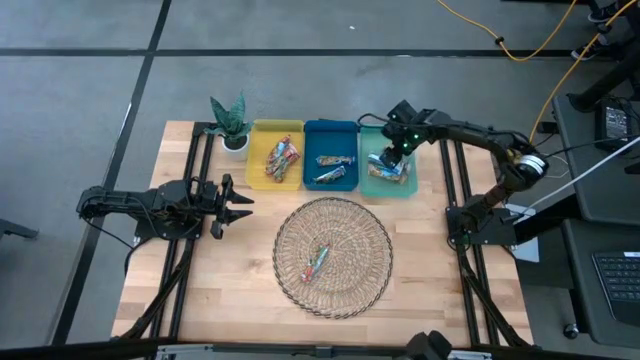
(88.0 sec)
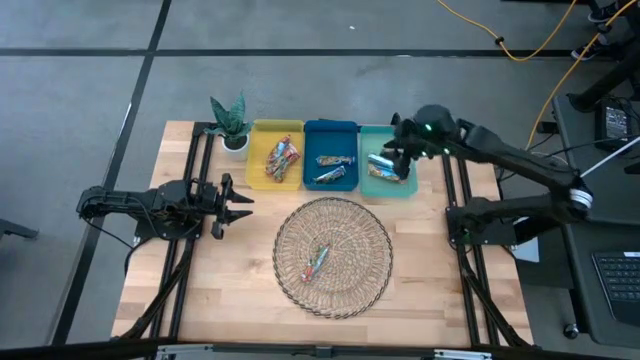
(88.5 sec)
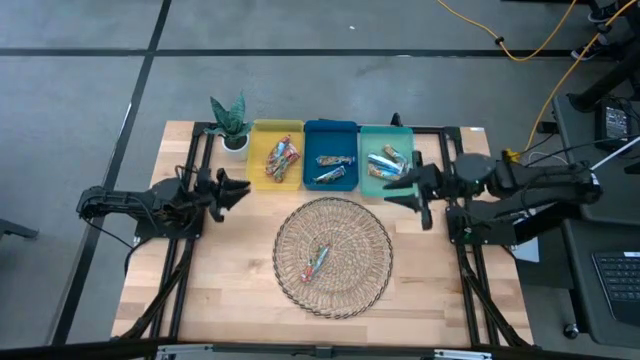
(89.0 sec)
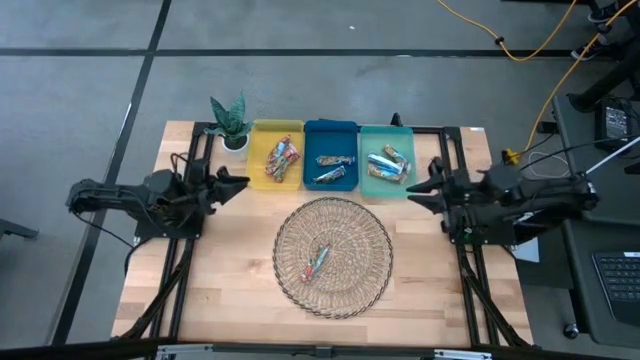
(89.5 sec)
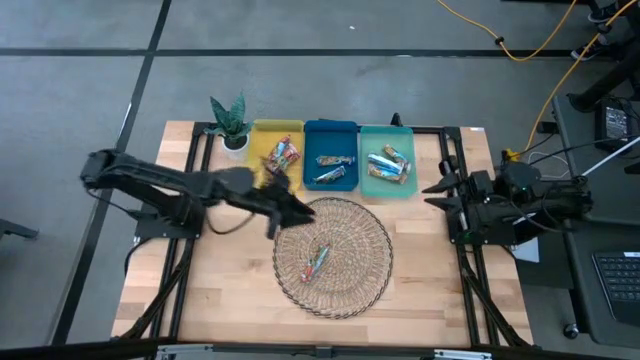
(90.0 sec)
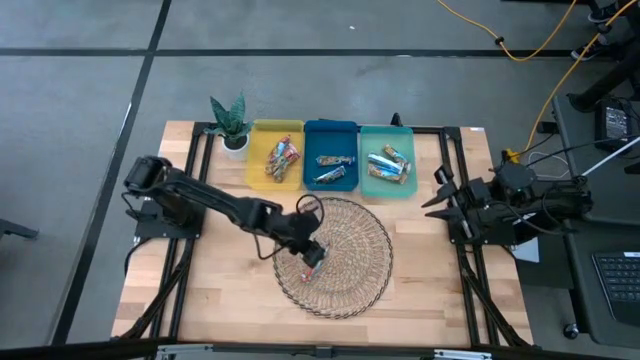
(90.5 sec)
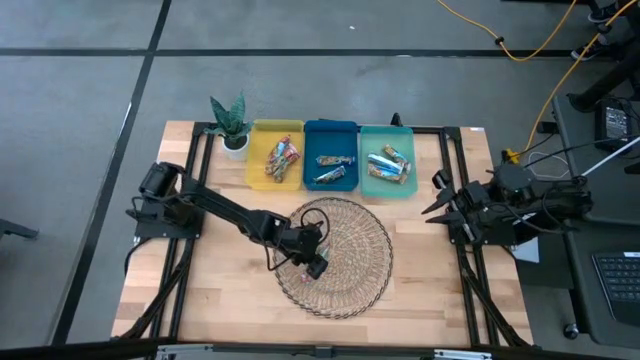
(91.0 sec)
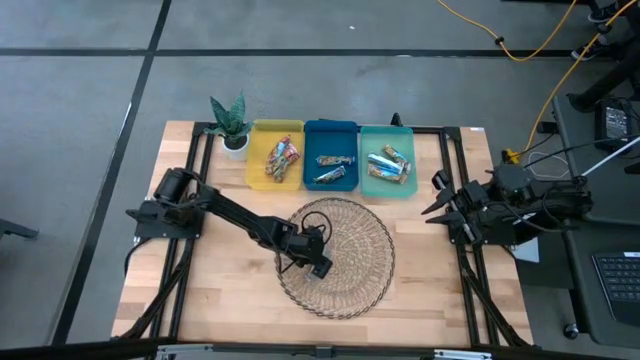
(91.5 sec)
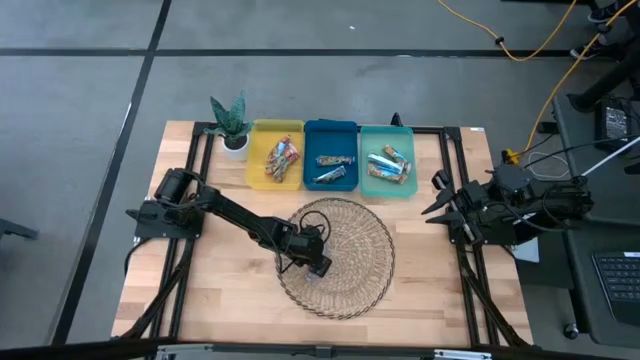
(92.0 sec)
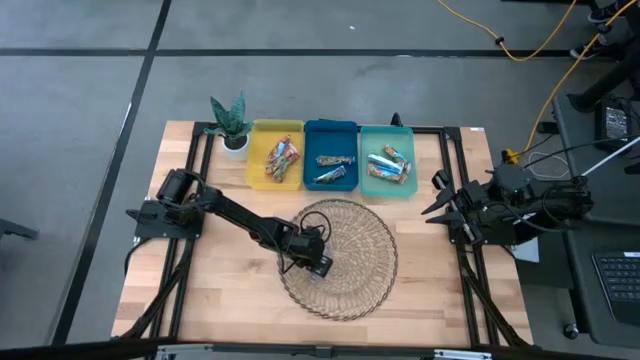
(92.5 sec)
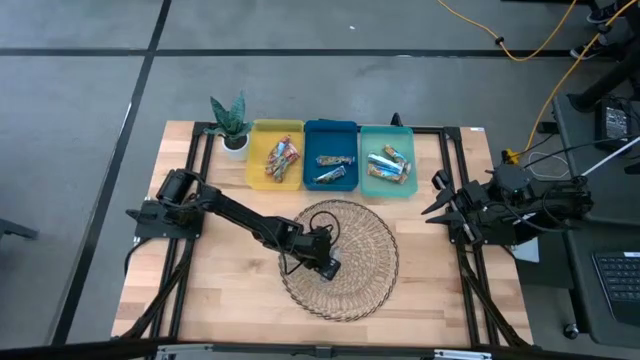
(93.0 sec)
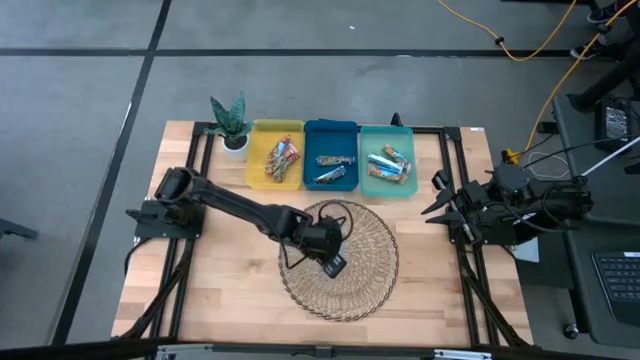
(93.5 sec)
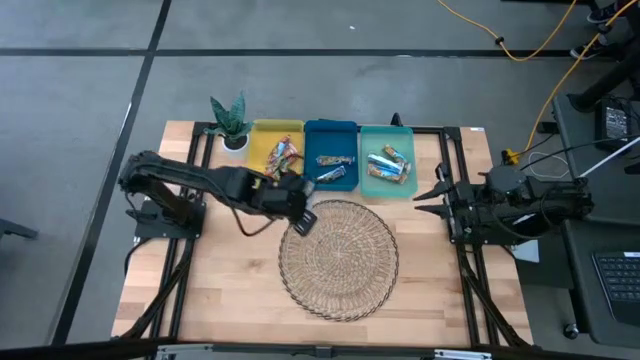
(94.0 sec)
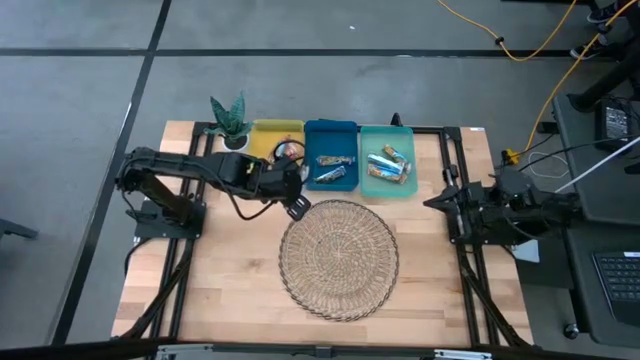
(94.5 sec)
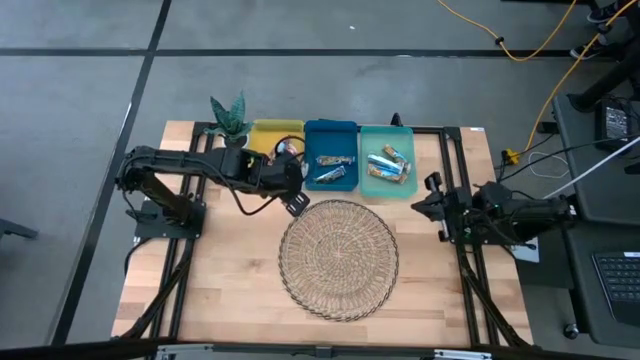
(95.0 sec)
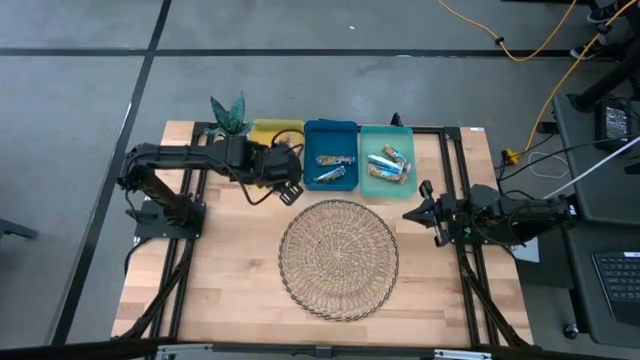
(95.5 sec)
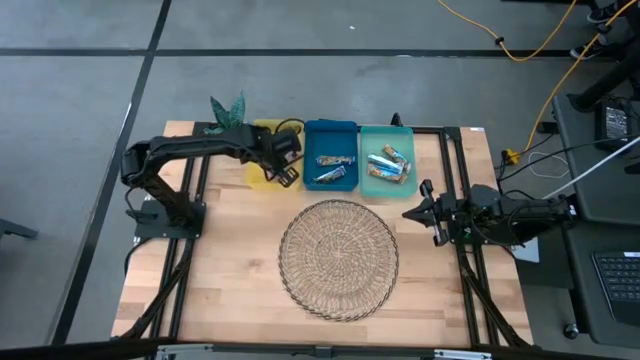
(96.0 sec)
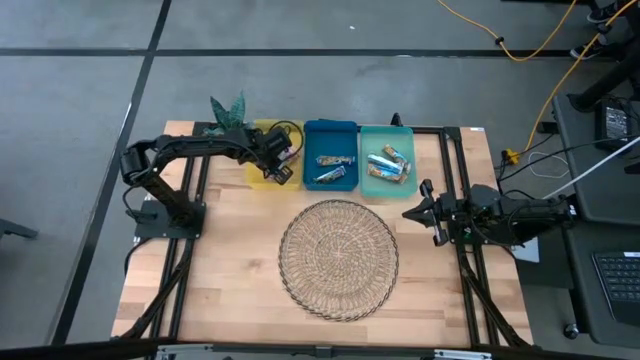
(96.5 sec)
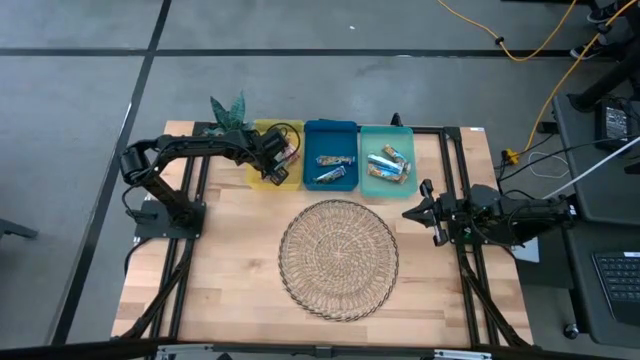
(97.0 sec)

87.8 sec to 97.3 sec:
Task: Pick and place Granola Bars by type
Put the red granola bar into the yellow bin

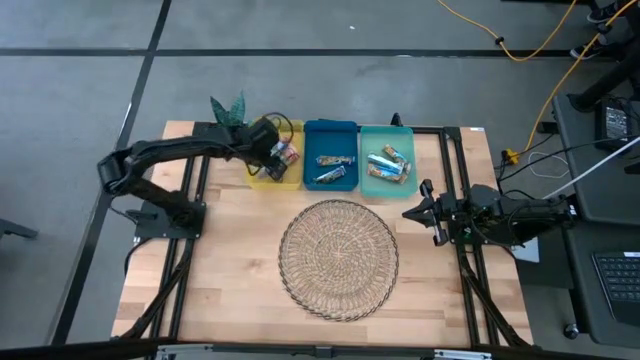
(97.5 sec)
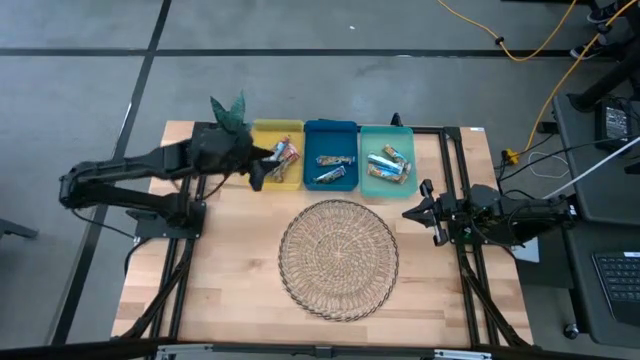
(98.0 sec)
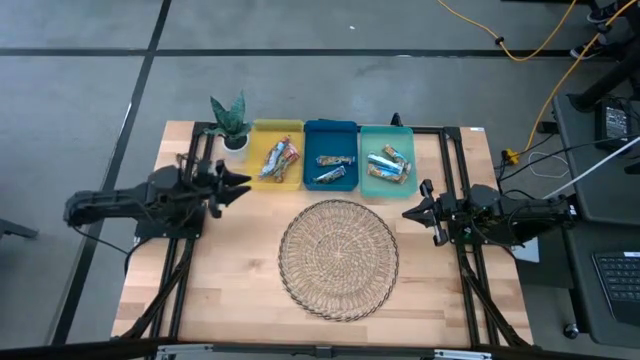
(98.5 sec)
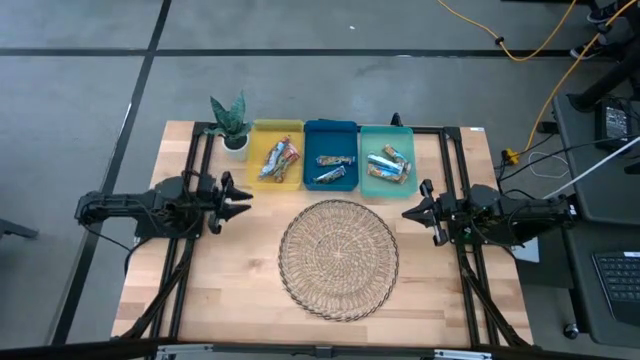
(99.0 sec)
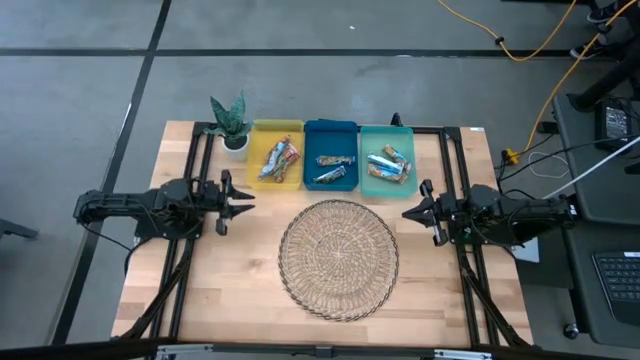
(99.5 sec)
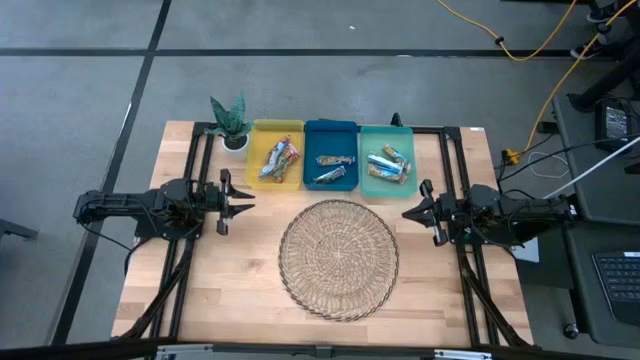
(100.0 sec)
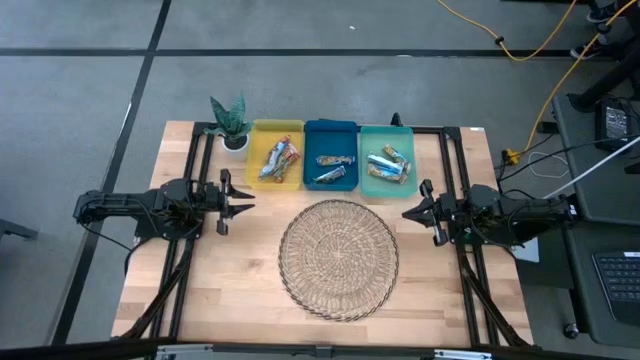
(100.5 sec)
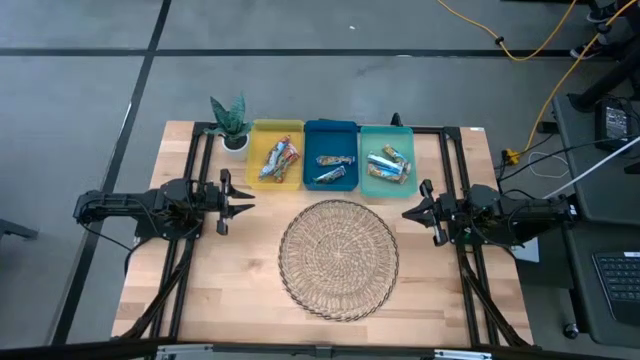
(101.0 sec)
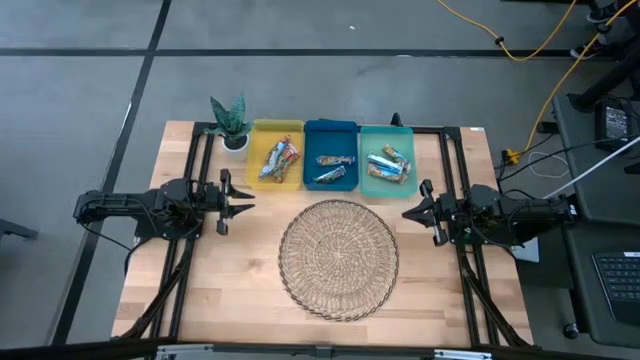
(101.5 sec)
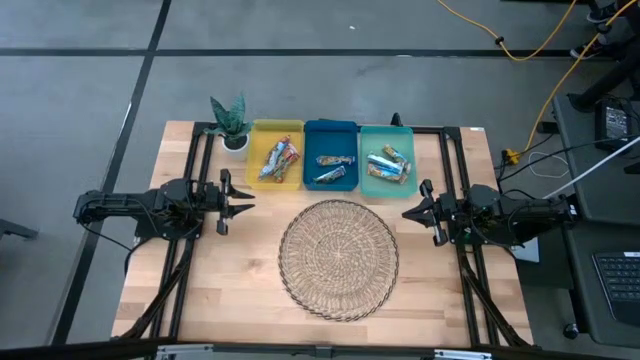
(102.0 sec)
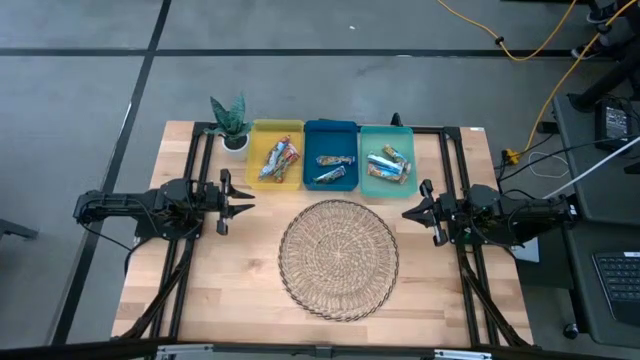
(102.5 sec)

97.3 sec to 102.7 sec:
Return to Home Position

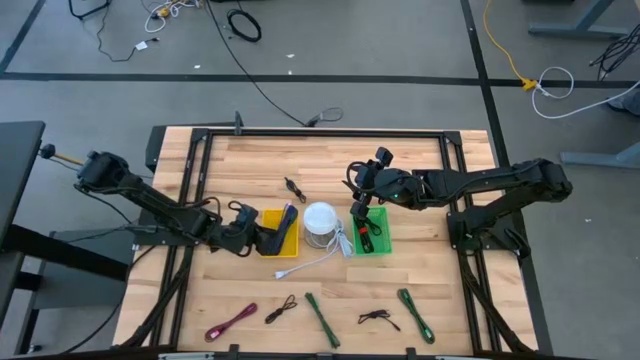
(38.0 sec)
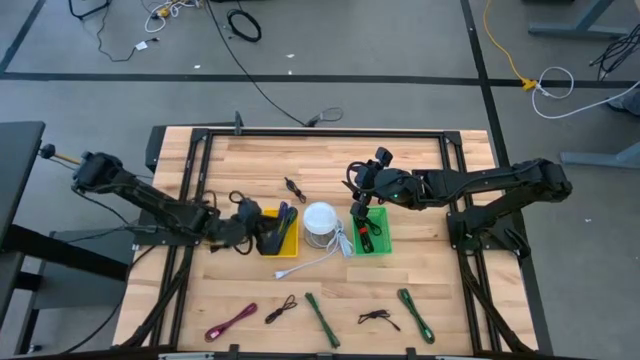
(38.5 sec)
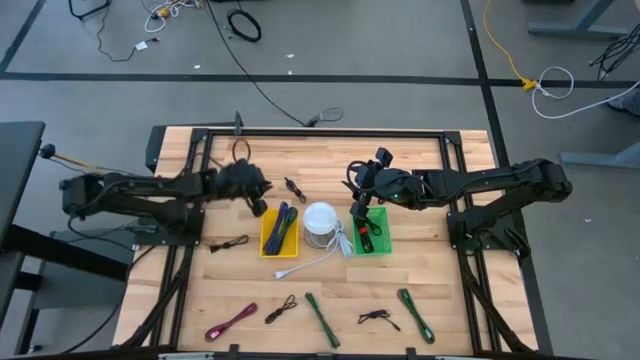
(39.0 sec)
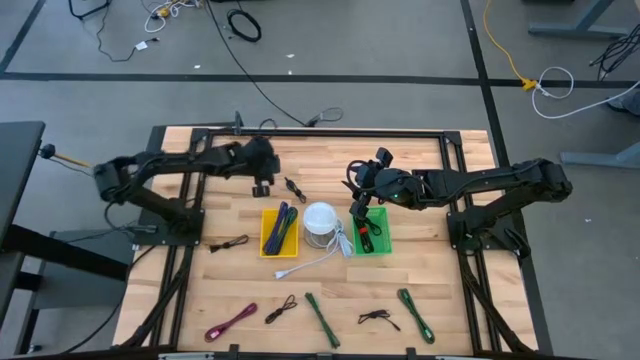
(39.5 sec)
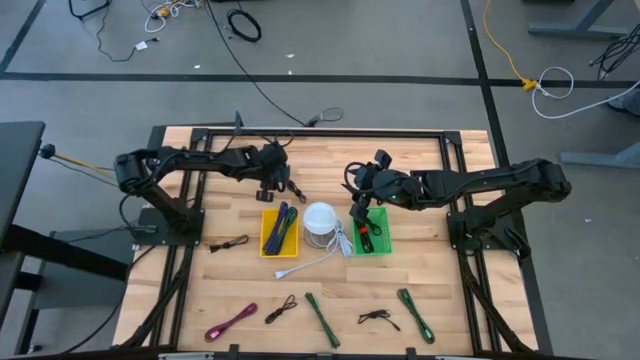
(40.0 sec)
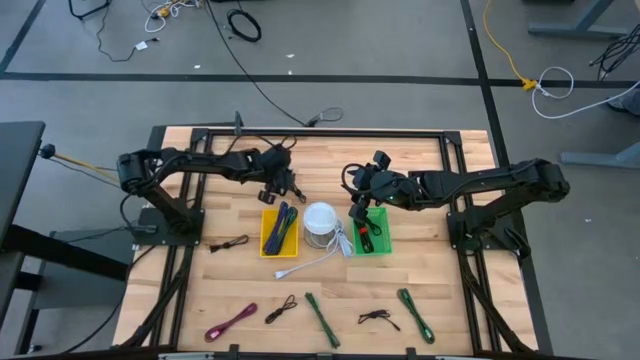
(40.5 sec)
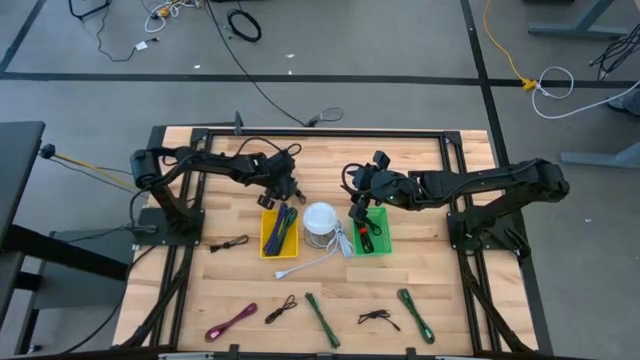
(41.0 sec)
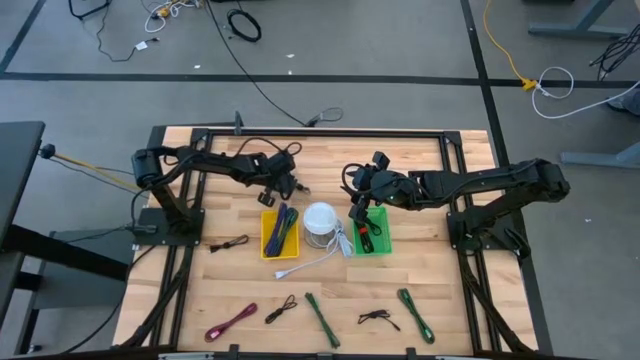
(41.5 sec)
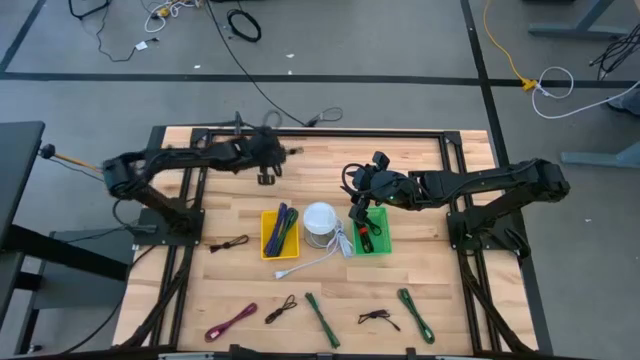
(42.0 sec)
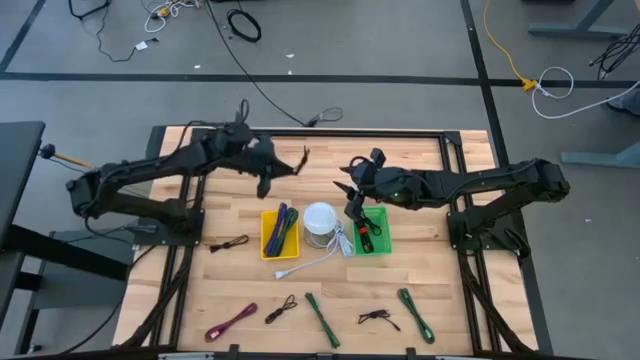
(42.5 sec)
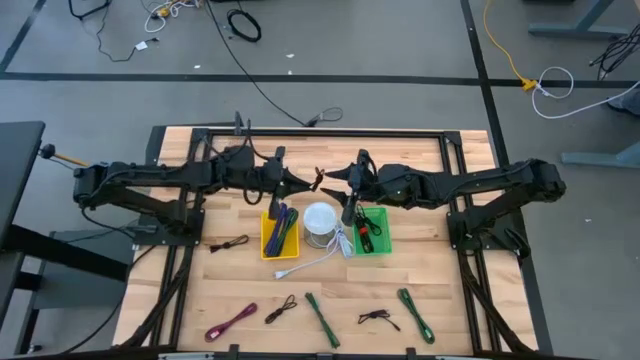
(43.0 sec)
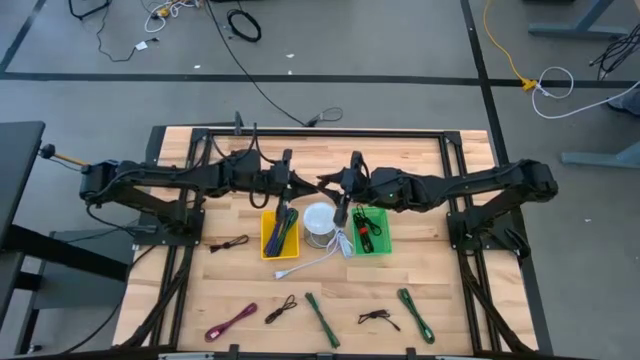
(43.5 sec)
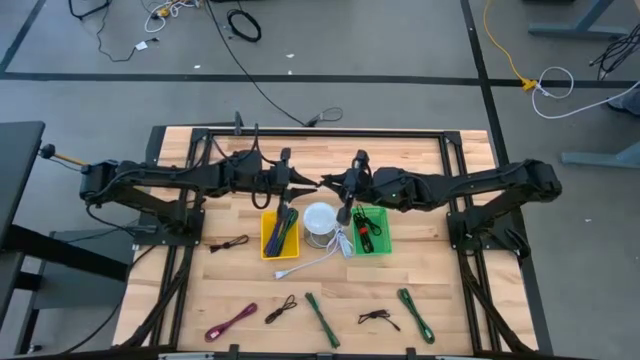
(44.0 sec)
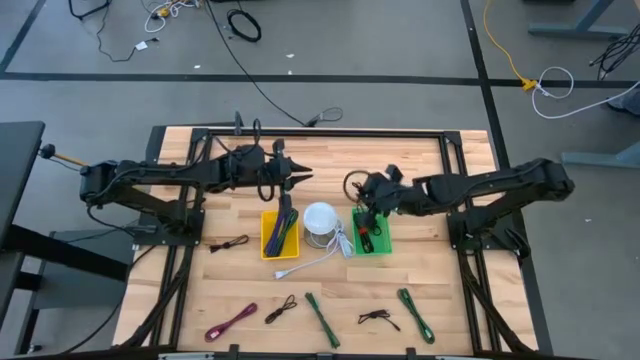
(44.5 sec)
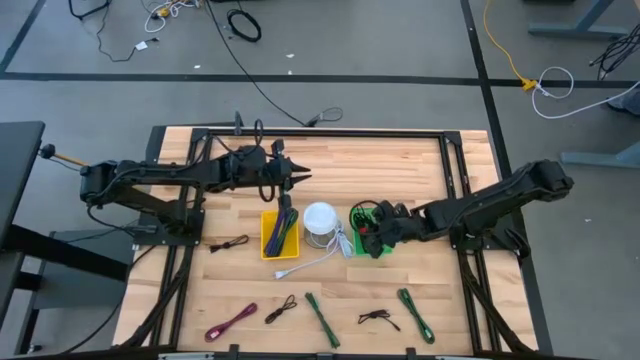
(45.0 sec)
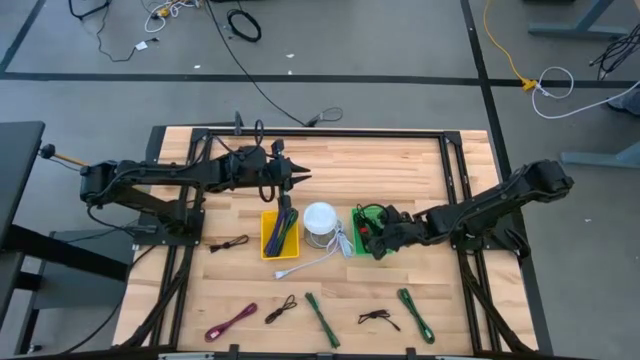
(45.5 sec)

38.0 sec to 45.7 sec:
Task: Pick & Place USB Port
Put the black charger cable into the green basket
